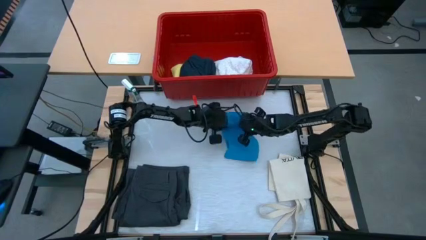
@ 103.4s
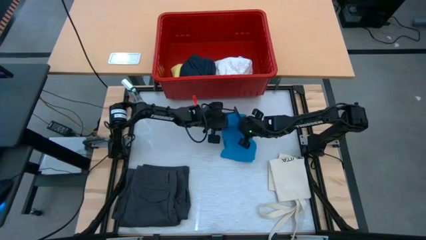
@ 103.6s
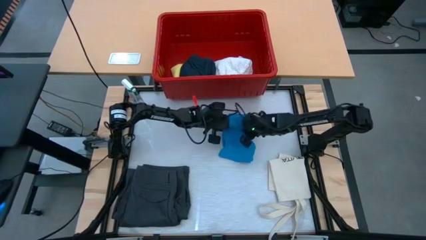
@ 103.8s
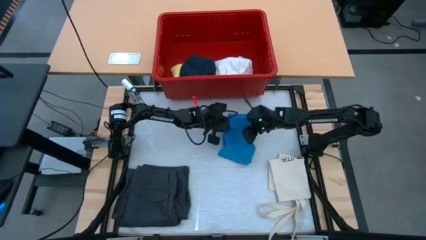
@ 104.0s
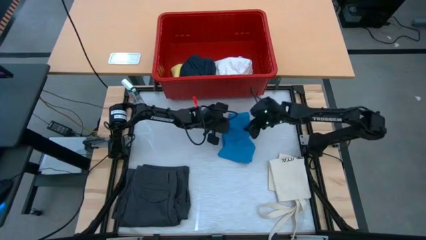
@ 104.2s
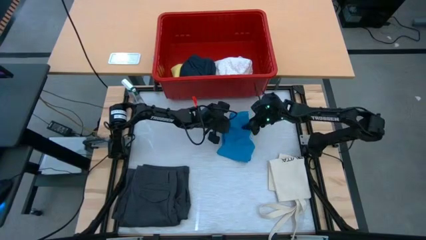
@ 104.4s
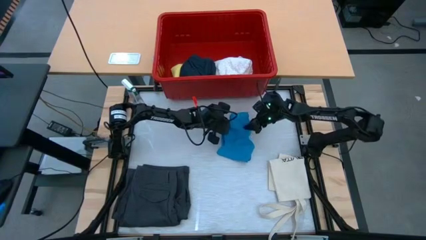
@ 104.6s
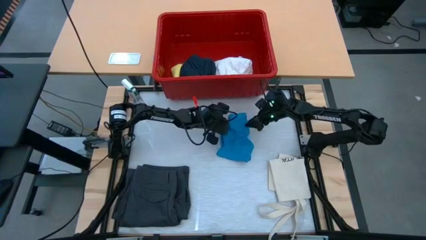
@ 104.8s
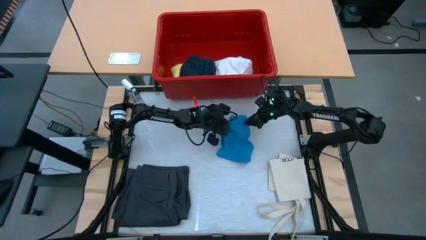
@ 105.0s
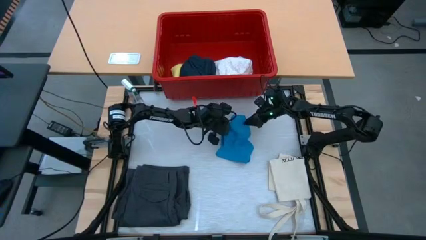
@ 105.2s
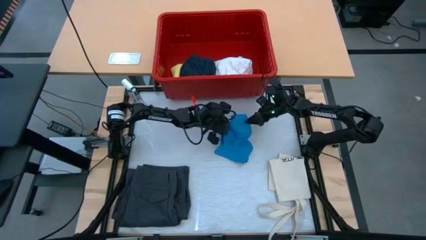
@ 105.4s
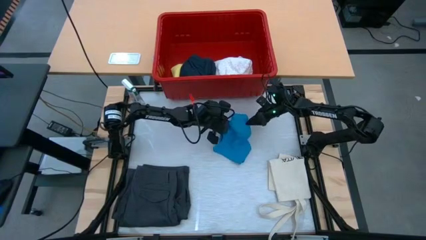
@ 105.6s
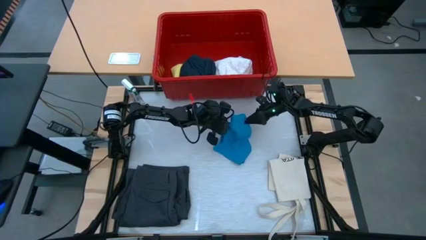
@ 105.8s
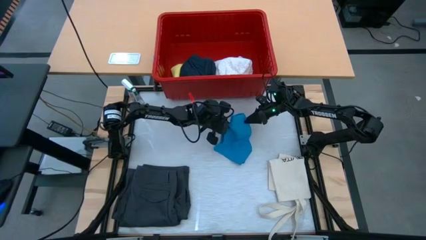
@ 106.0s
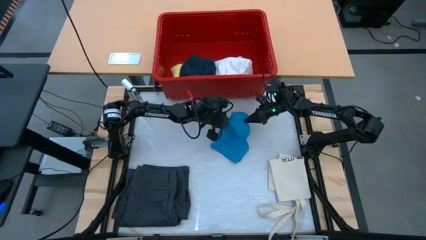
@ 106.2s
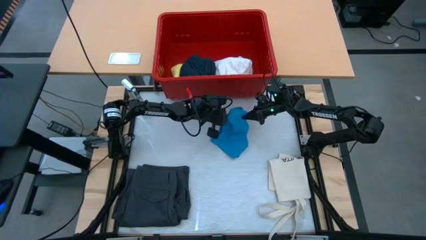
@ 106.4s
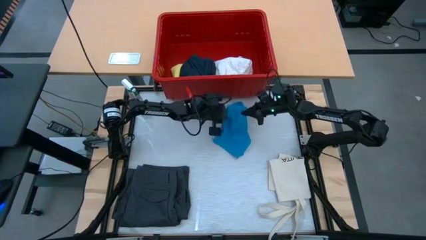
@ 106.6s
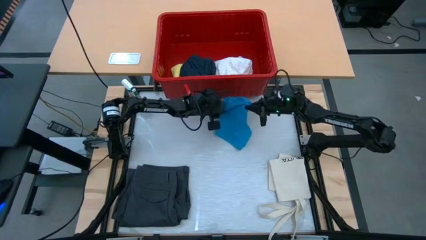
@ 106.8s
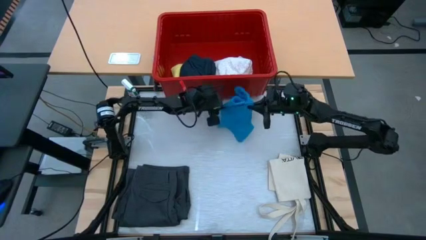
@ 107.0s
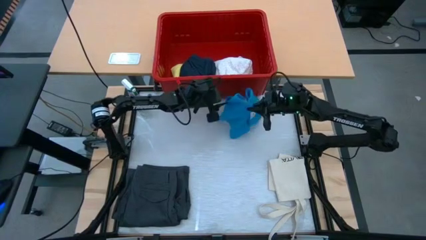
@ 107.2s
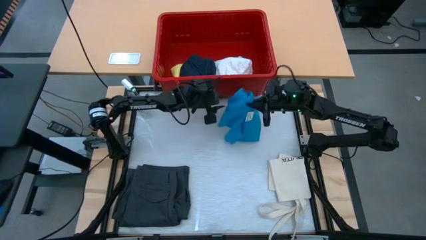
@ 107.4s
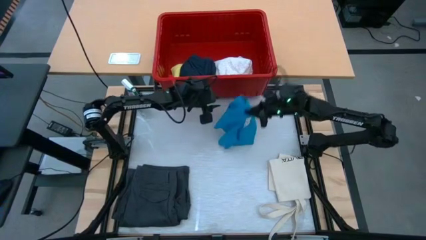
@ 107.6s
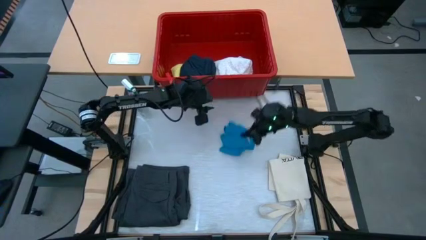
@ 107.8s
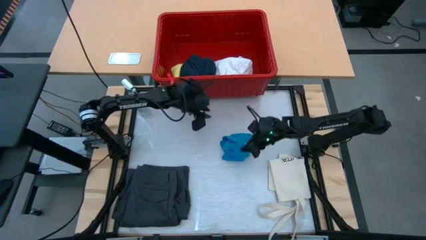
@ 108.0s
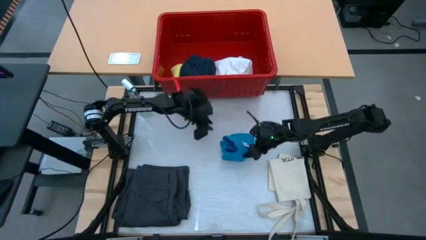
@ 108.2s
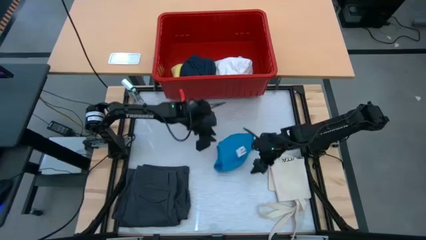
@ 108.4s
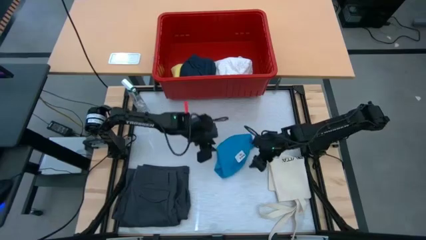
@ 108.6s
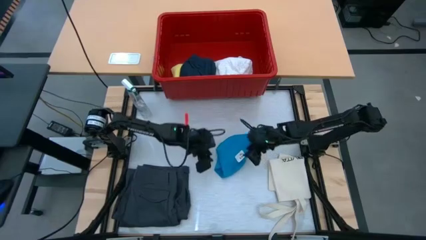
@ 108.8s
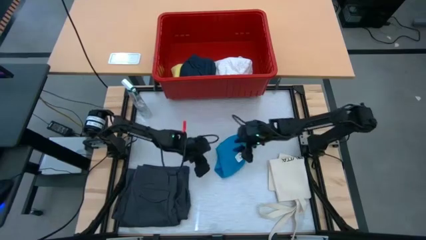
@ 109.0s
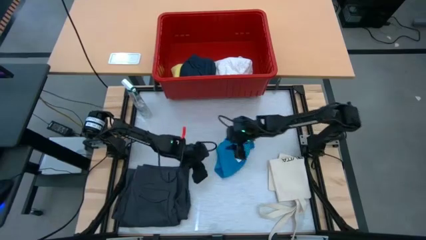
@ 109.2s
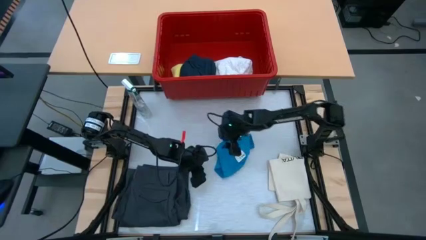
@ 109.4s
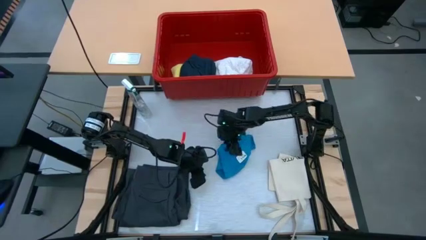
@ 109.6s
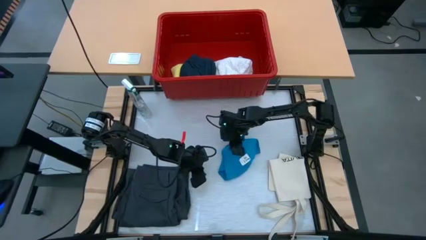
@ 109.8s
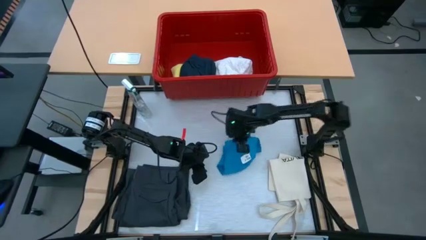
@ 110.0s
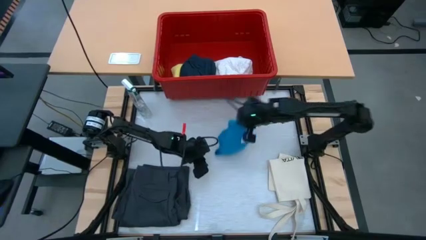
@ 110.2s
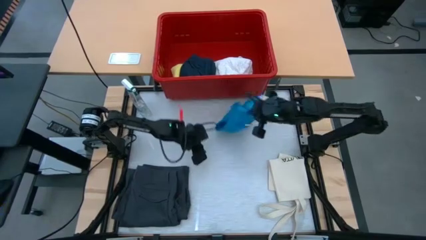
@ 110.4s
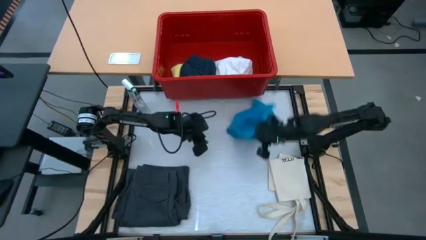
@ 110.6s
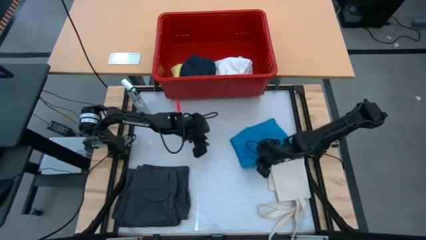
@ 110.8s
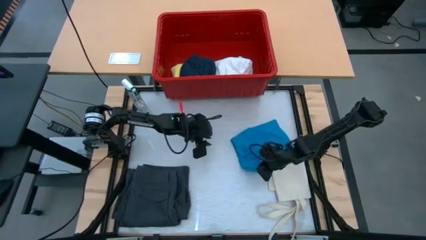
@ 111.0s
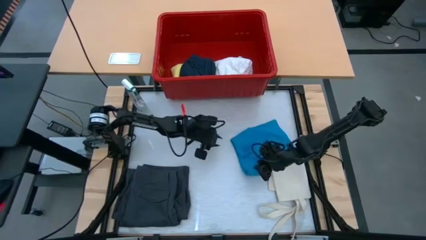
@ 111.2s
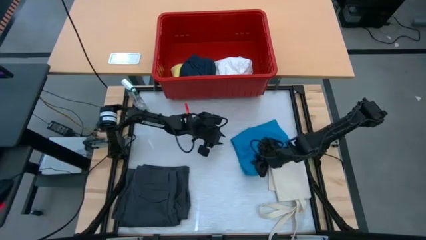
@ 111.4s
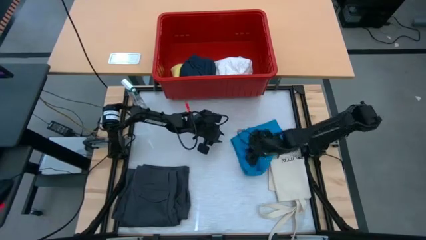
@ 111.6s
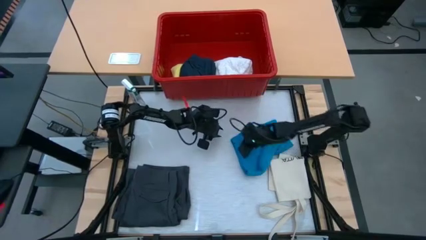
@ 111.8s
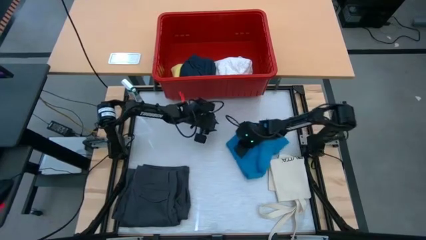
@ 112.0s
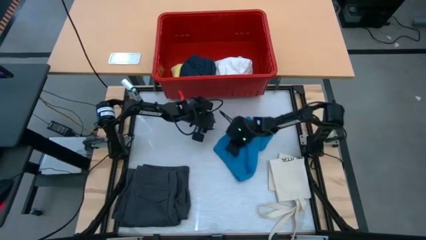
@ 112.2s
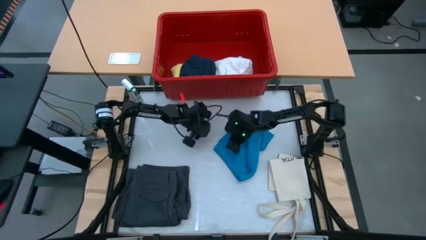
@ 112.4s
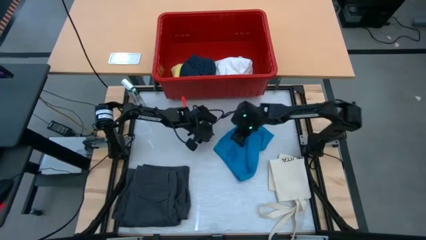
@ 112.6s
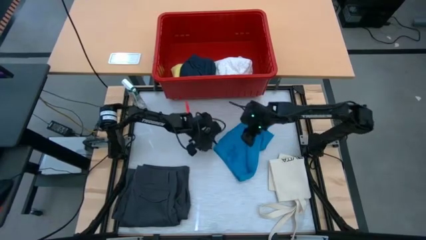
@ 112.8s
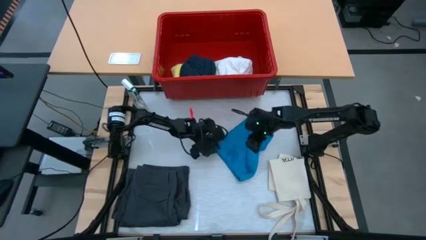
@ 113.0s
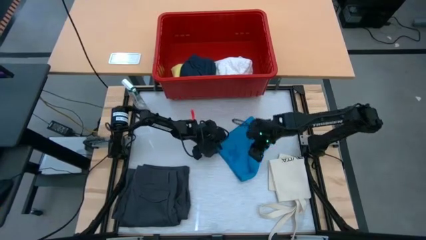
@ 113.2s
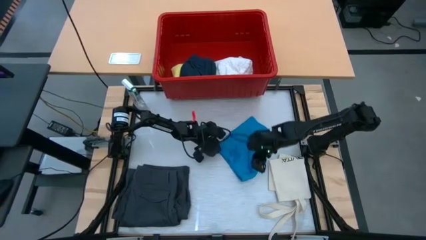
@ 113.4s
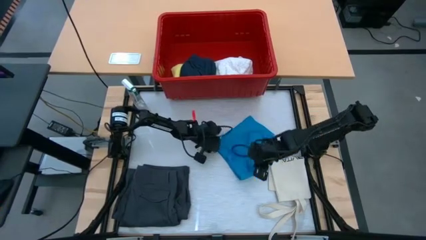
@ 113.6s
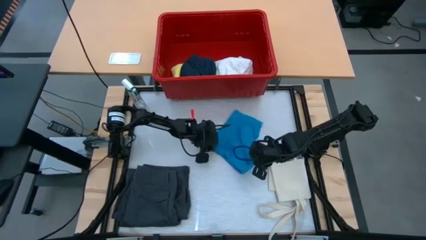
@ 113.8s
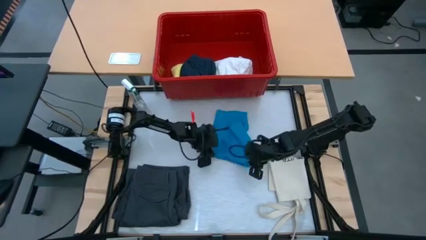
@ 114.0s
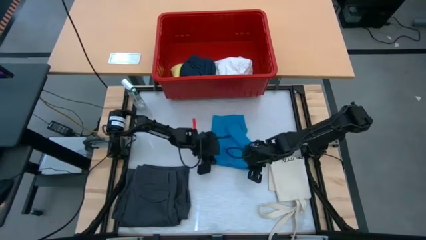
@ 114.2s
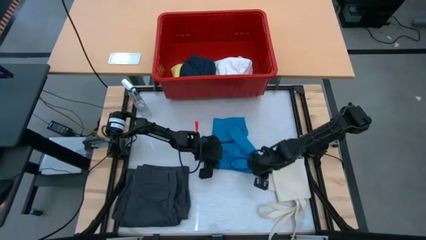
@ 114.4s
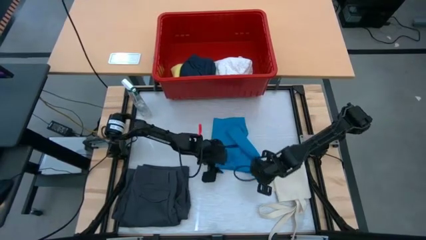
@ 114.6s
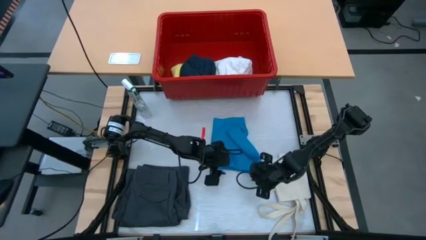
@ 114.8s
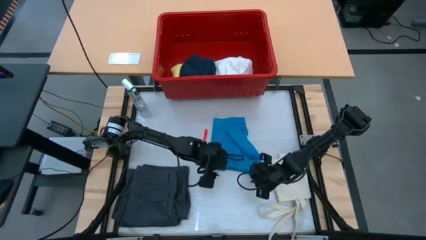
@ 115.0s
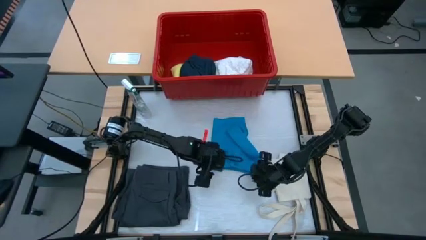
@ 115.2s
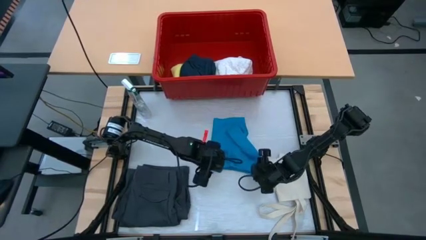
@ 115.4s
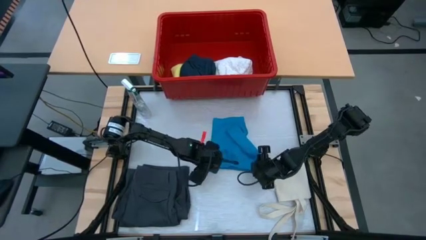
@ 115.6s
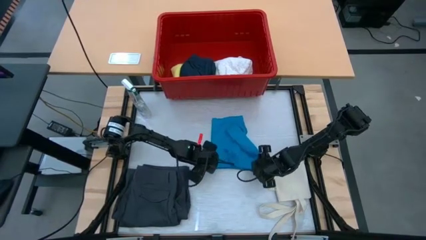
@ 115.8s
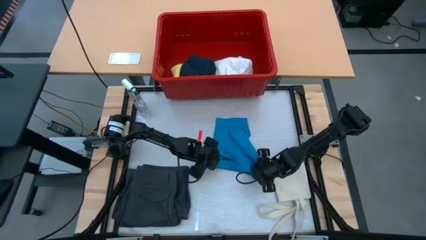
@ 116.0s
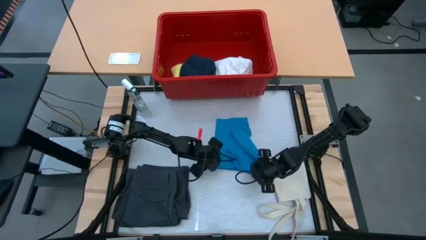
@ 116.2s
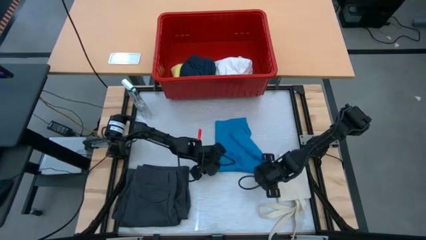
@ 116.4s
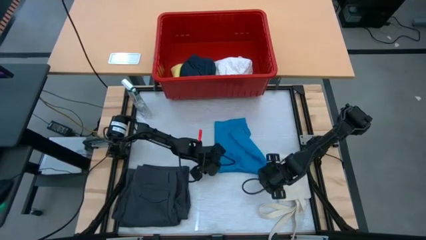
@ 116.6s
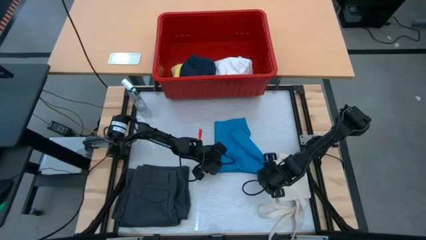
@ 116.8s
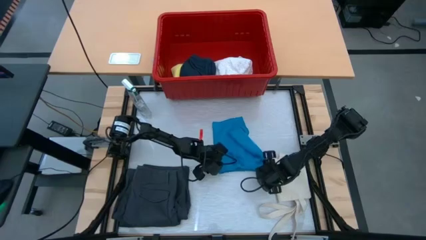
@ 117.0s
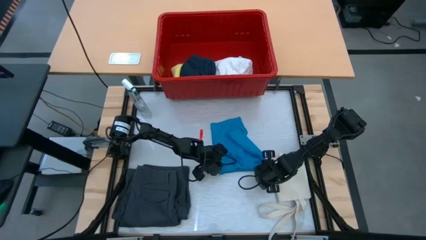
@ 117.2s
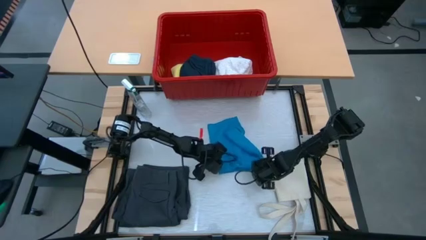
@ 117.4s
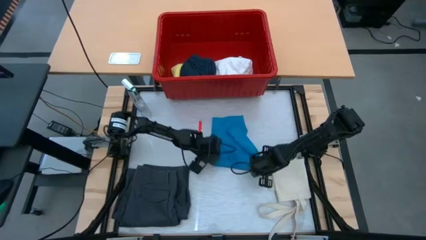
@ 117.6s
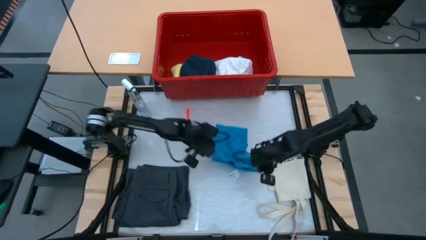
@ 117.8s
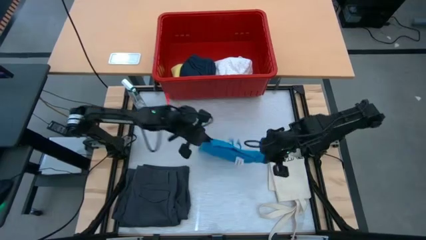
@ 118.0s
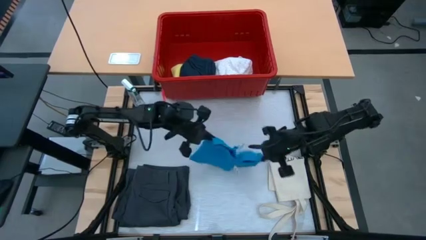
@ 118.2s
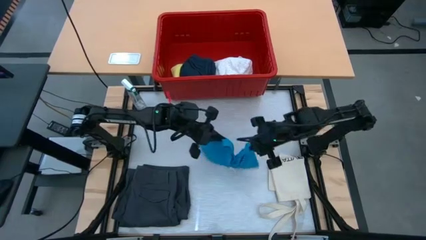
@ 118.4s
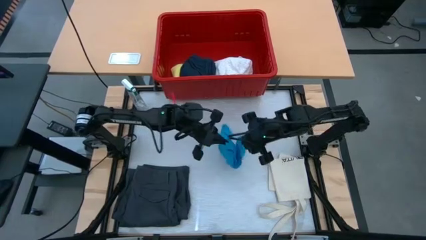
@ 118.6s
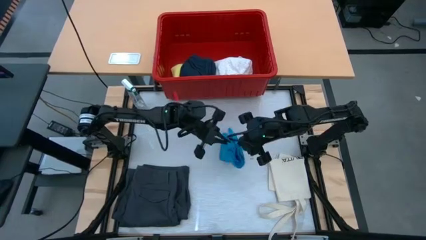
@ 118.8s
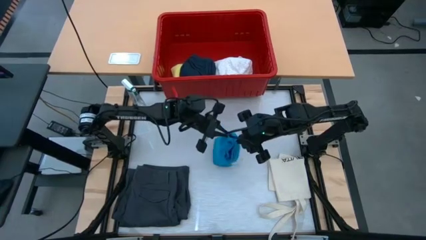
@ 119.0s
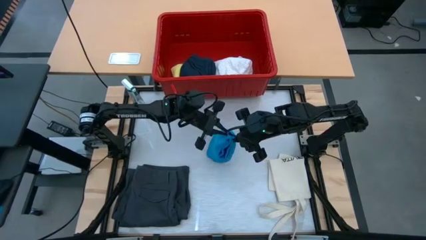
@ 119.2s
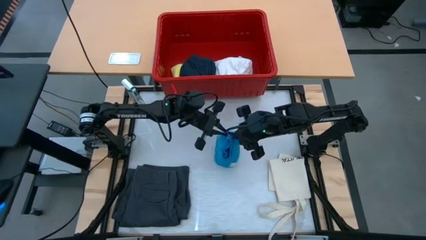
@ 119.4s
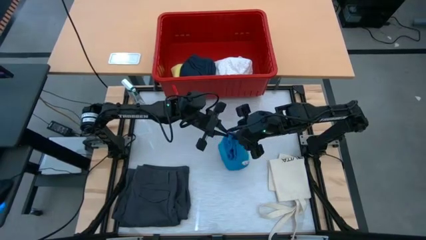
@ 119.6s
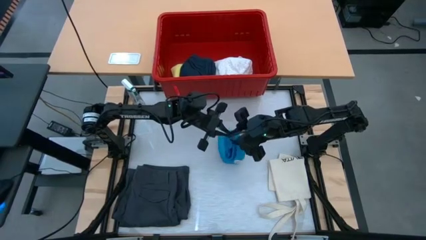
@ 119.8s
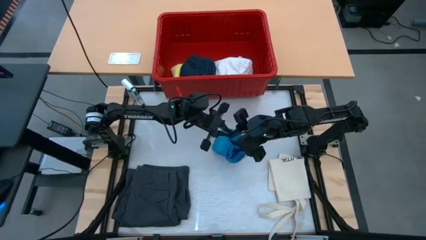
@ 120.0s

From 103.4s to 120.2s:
Task: Fold laundry
Fold the blue shorts
